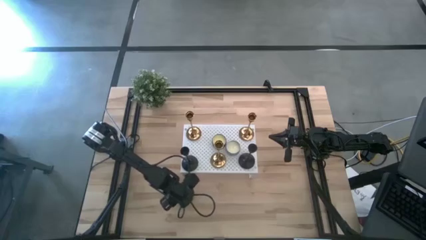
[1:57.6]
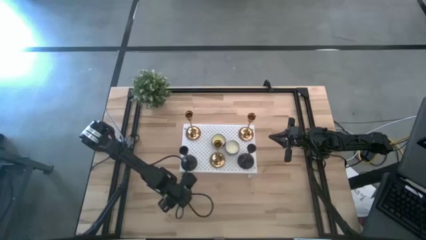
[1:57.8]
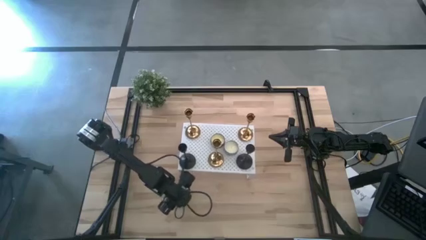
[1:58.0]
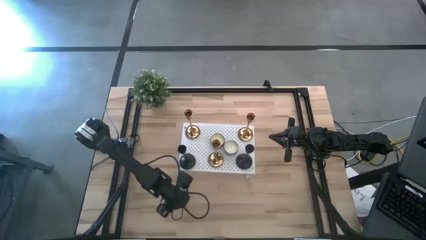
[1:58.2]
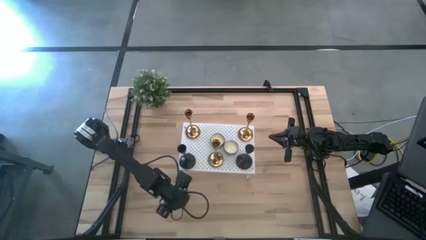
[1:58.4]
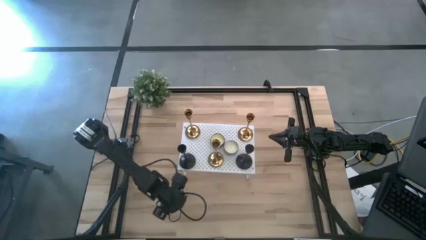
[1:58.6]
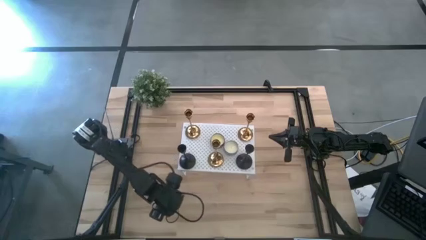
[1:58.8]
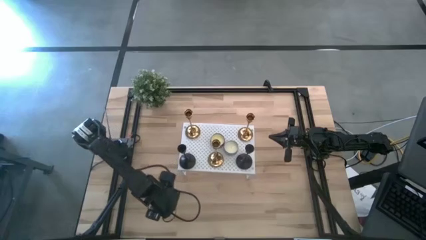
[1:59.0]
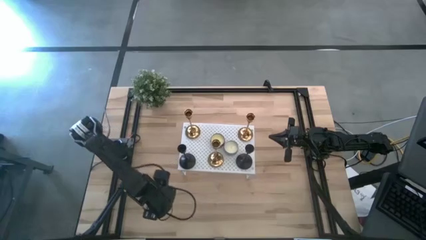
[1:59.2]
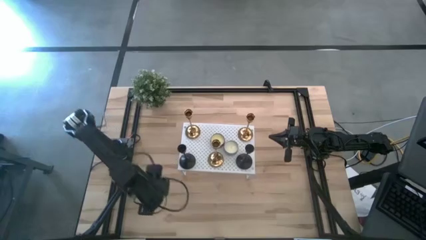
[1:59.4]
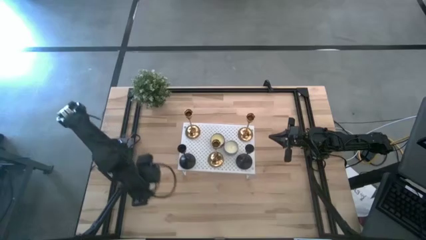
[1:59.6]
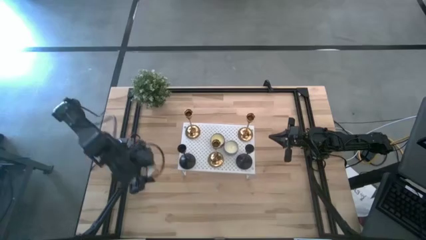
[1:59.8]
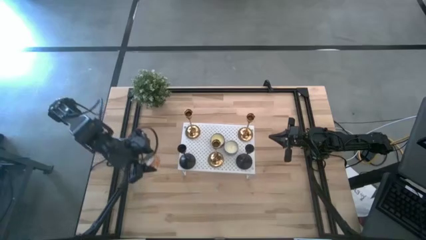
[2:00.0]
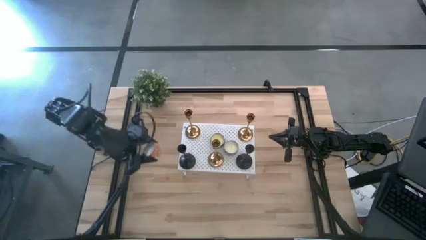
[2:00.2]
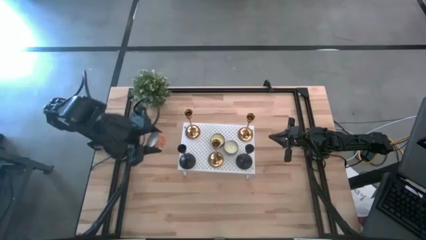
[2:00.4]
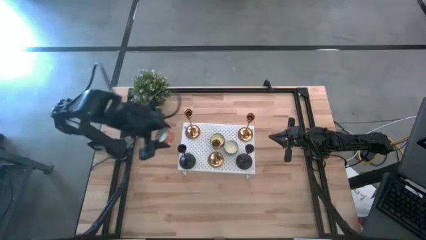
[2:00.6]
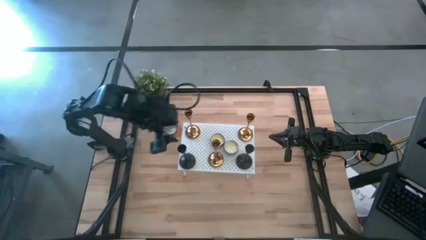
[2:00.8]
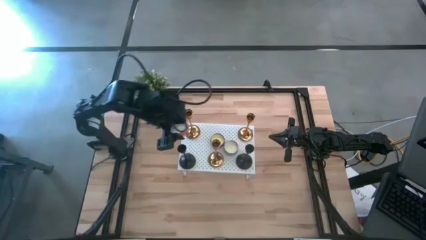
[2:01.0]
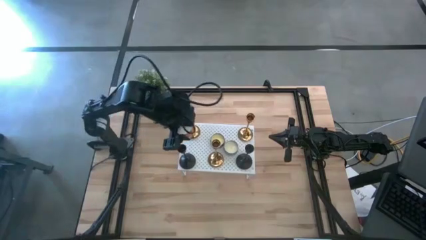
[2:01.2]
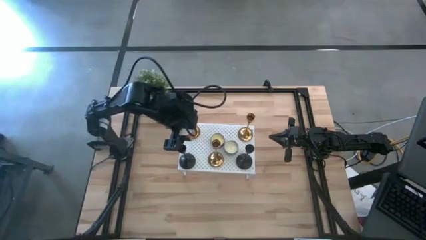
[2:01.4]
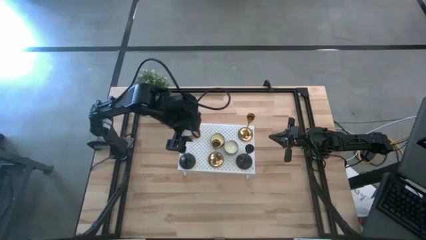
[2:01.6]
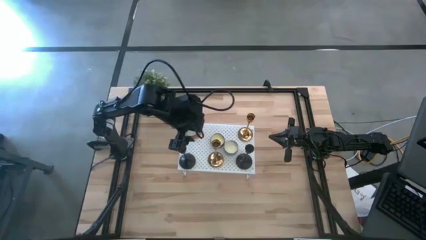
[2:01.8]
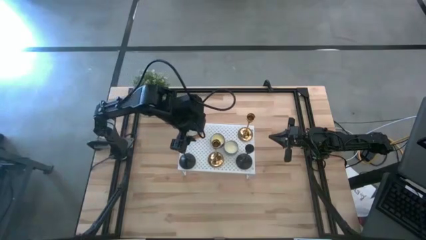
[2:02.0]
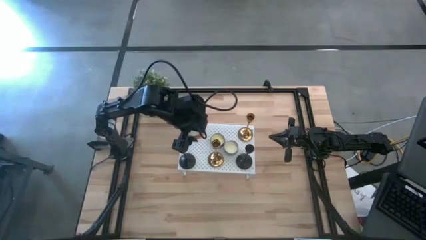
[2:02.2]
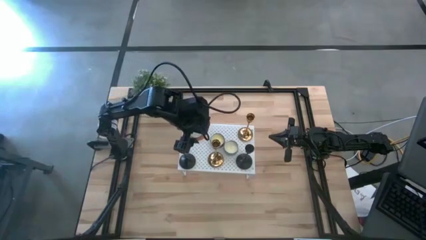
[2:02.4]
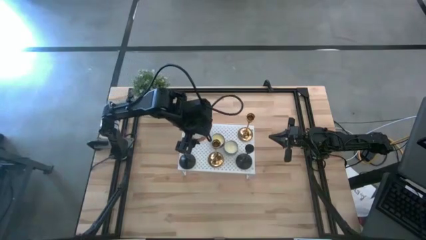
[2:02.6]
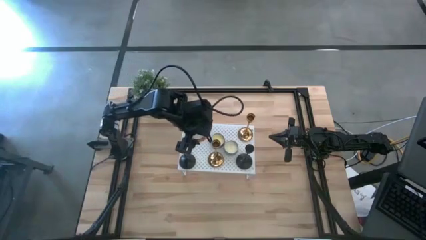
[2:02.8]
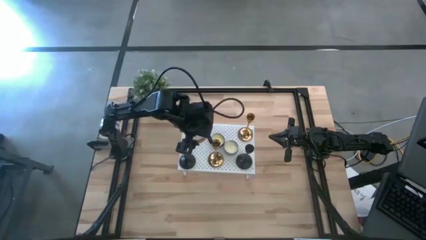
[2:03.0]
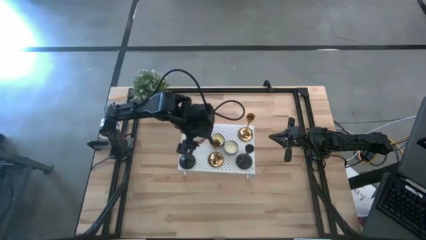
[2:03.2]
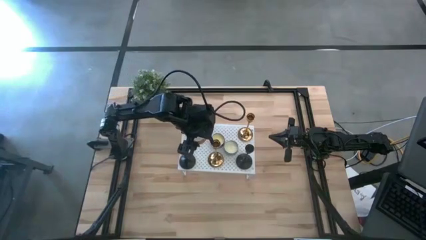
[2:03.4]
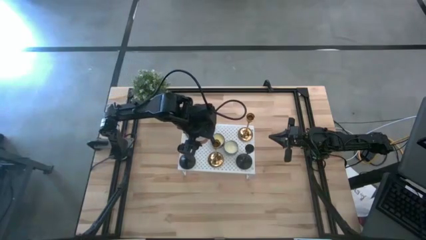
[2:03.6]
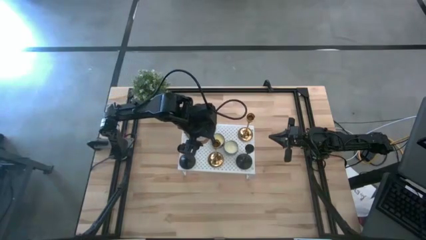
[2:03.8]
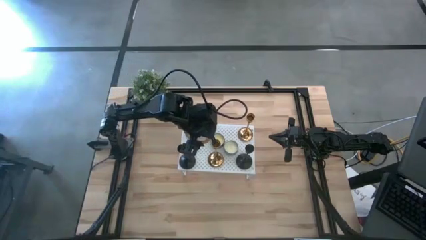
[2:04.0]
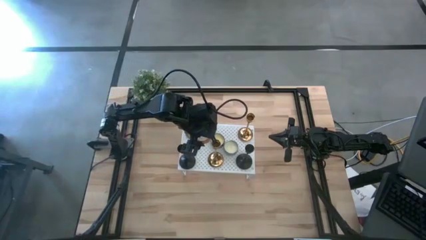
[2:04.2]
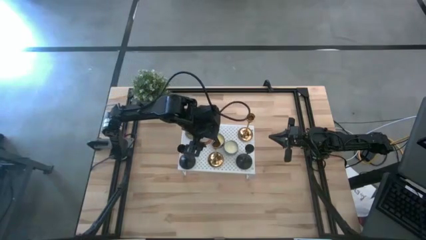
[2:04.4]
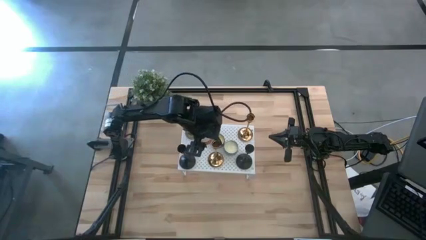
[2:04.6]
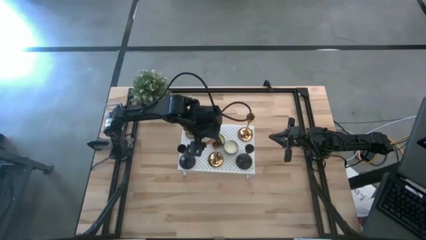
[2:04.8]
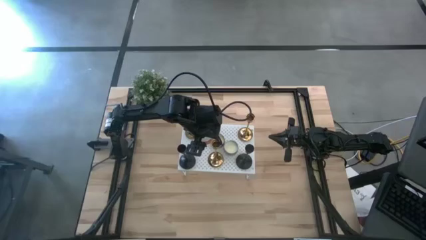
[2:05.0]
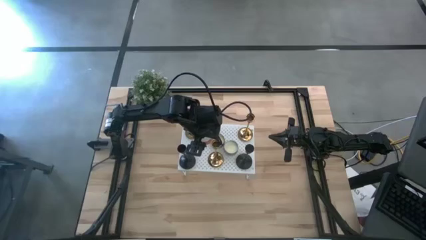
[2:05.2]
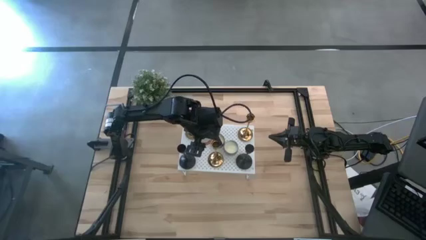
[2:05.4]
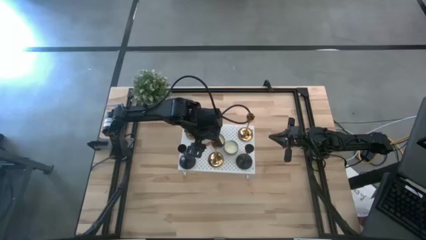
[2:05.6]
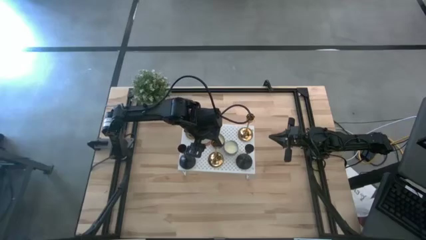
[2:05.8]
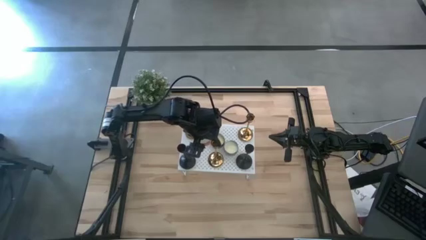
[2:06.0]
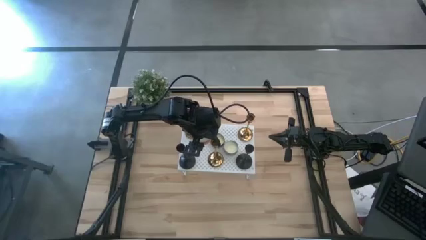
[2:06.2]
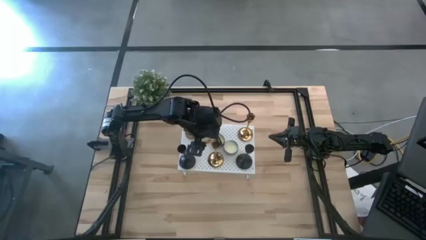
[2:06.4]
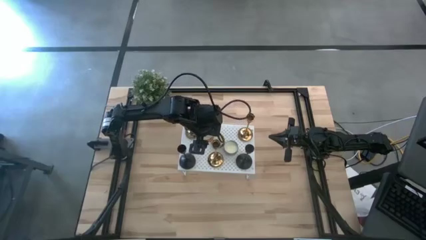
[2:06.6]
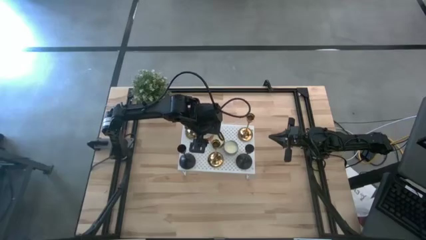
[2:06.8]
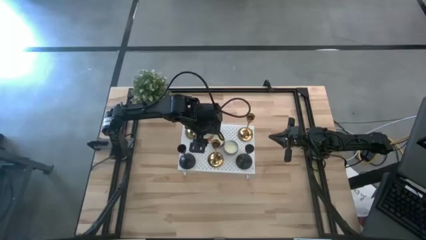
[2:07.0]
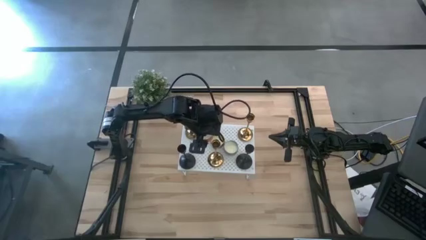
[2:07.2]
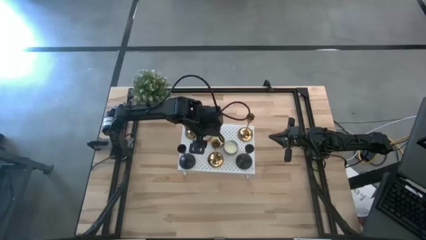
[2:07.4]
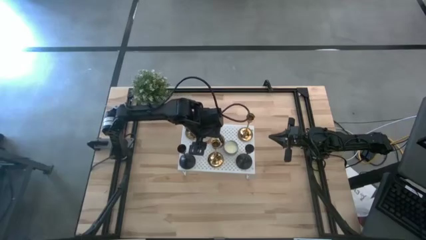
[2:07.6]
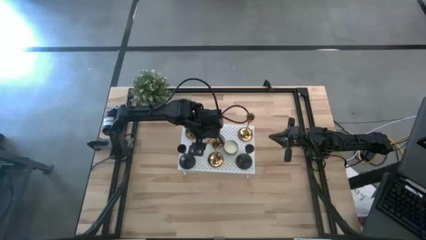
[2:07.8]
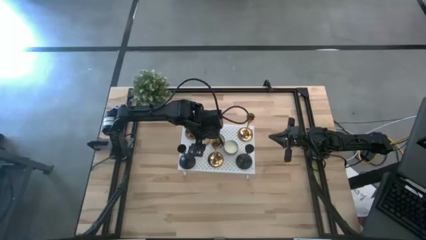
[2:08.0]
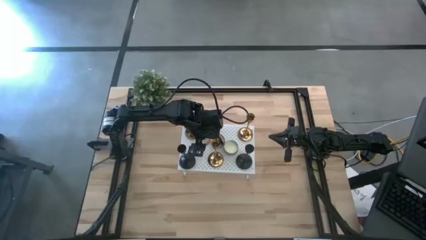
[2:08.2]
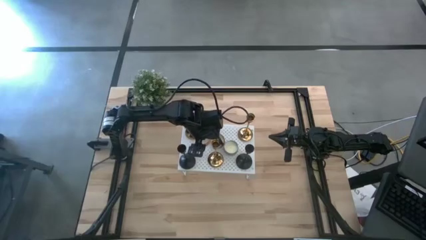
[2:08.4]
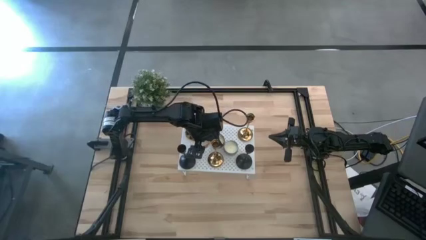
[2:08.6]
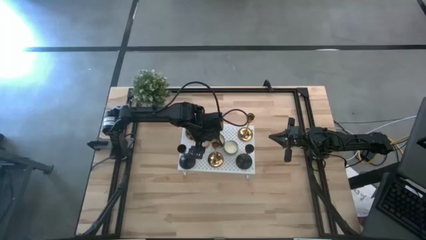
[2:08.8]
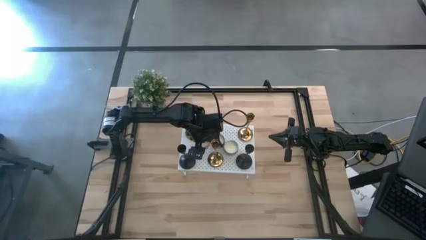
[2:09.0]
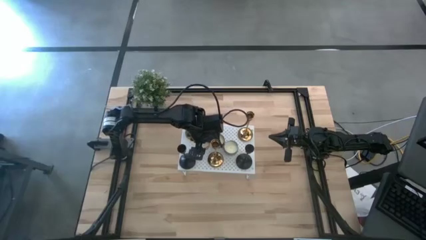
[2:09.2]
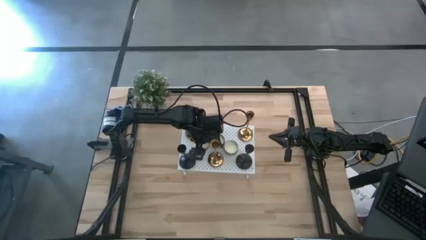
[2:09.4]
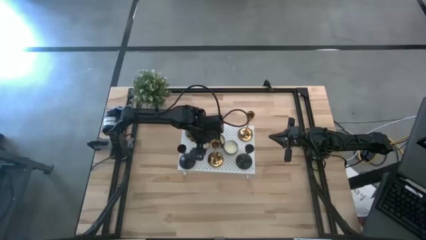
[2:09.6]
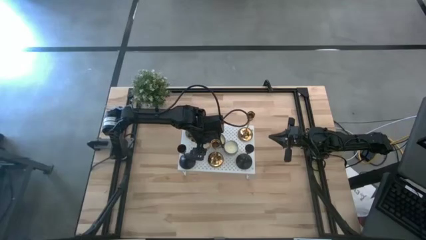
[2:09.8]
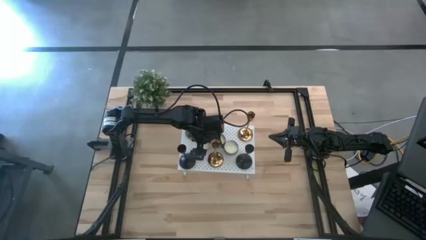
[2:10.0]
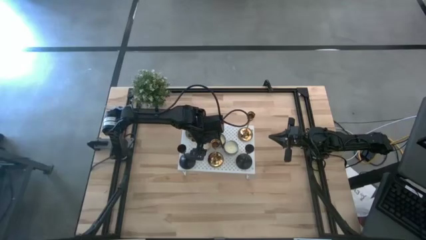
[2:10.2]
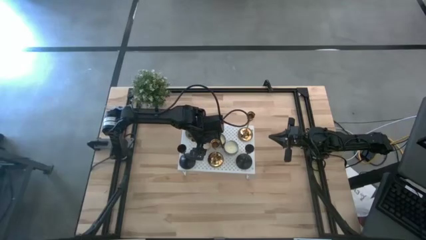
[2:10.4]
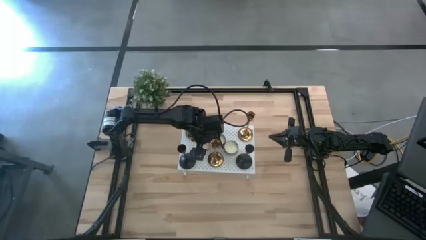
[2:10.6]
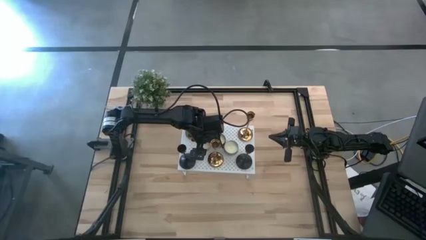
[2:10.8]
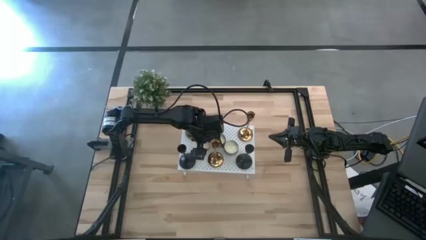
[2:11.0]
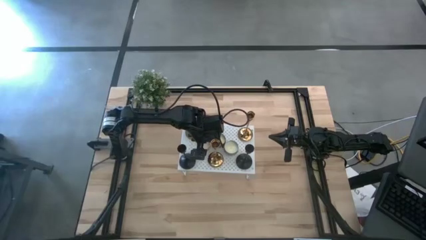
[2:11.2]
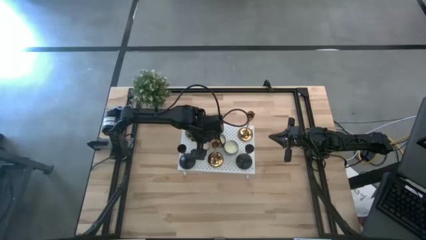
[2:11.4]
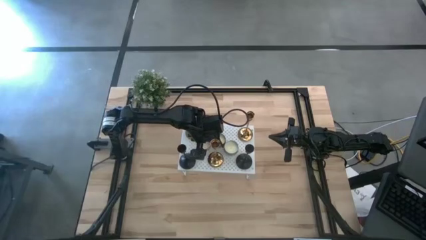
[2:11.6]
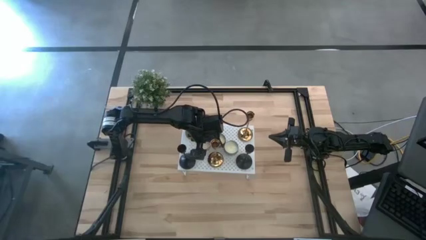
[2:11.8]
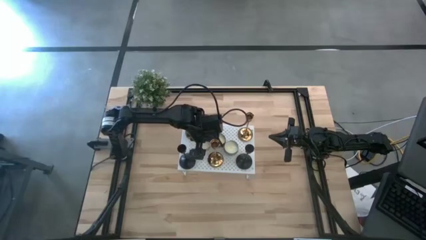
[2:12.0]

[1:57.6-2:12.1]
Task: Pick & Place candle stick holders
Put the scented candle on the shelf

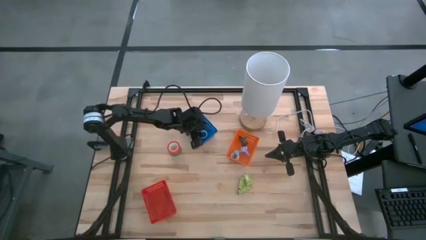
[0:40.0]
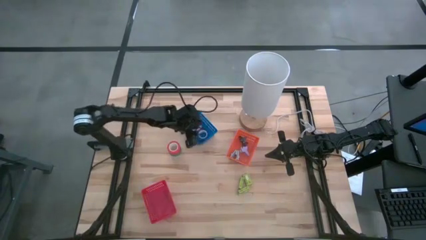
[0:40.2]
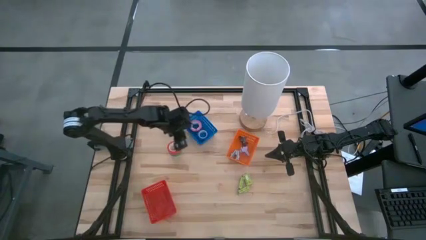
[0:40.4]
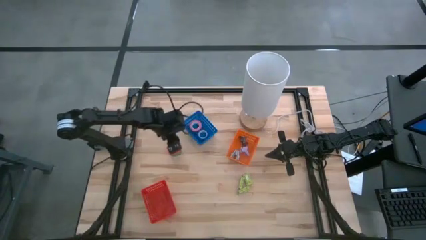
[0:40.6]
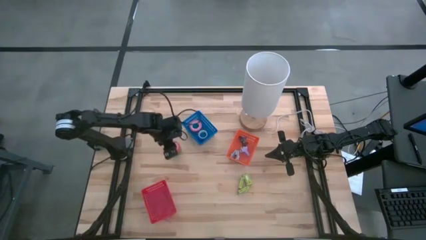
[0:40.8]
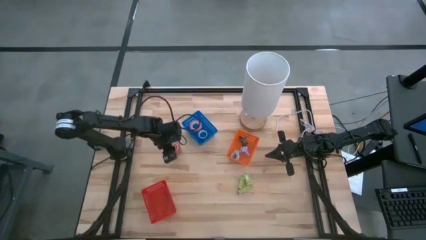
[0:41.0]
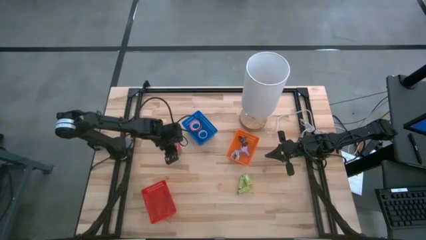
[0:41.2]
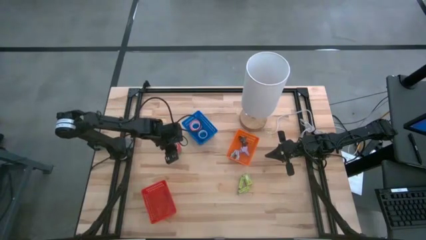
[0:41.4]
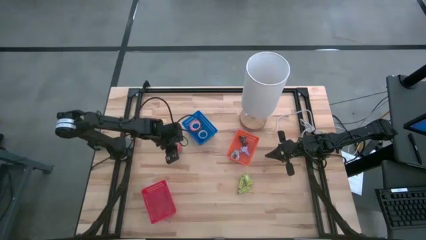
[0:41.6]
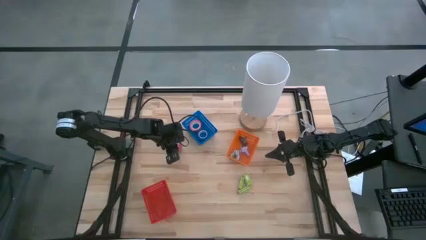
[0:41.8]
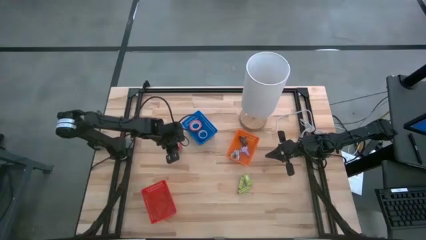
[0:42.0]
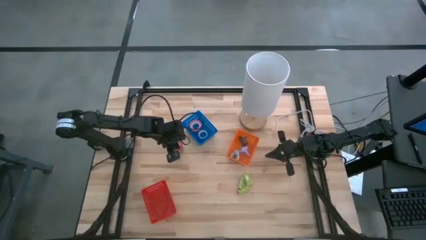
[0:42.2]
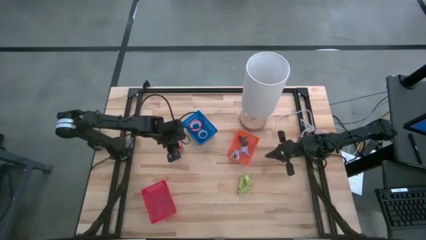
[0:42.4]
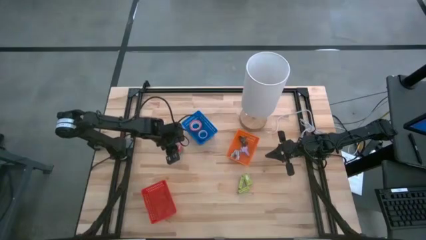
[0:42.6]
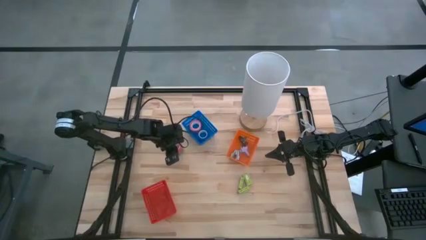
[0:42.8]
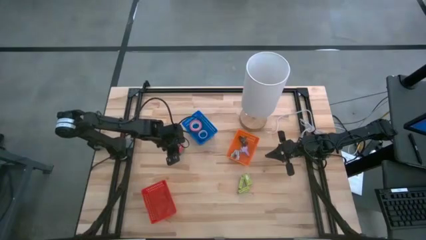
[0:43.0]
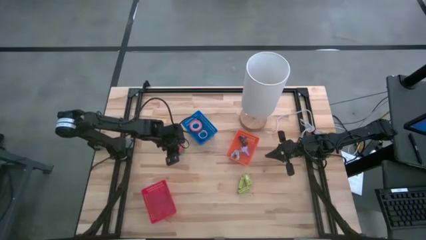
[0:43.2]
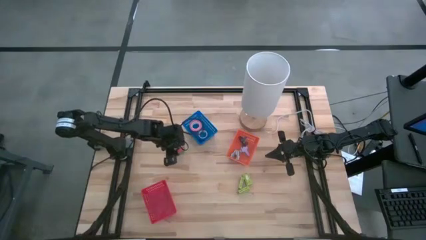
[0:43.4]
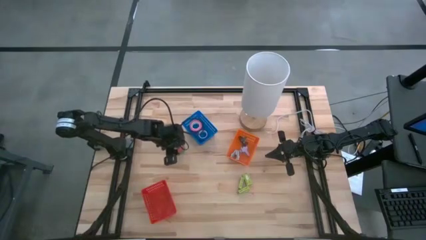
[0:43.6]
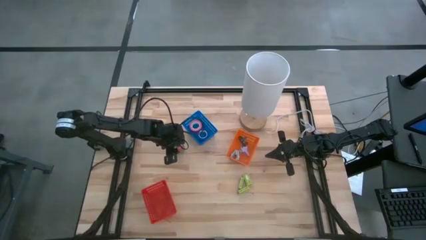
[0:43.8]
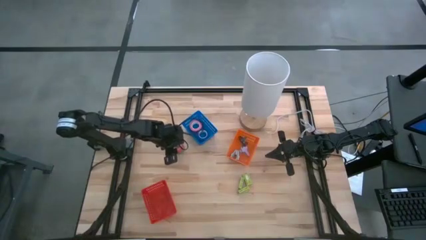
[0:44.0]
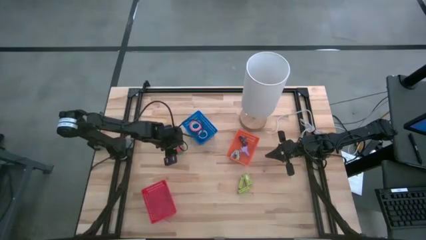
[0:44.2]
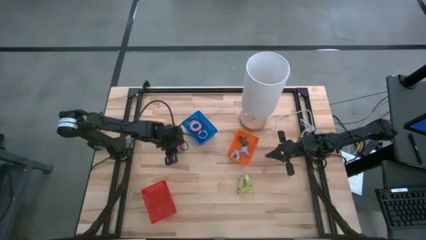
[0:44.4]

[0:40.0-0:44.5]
Task: Pick and place Stapler, Stapler remover, tape
Put the orange tape into the blue basket
